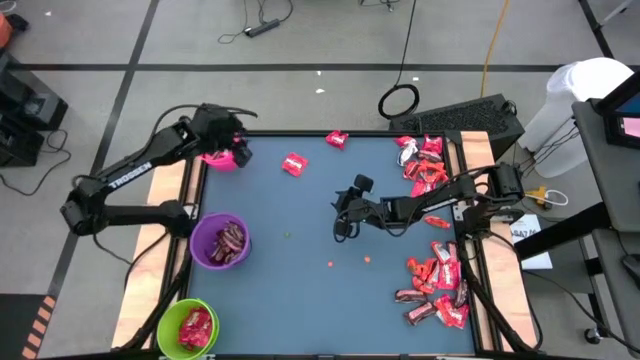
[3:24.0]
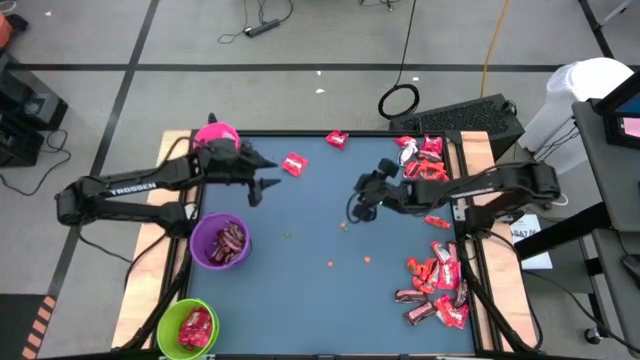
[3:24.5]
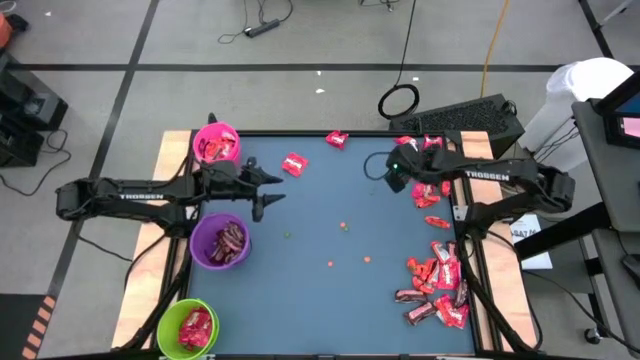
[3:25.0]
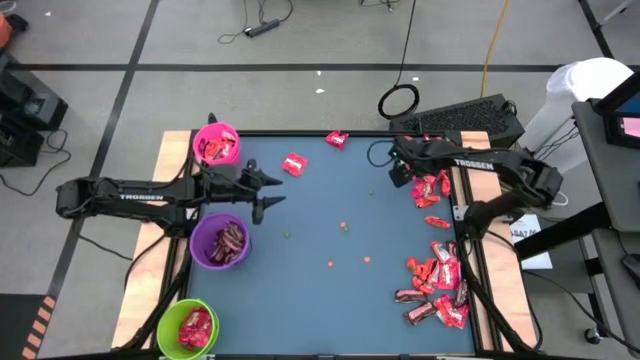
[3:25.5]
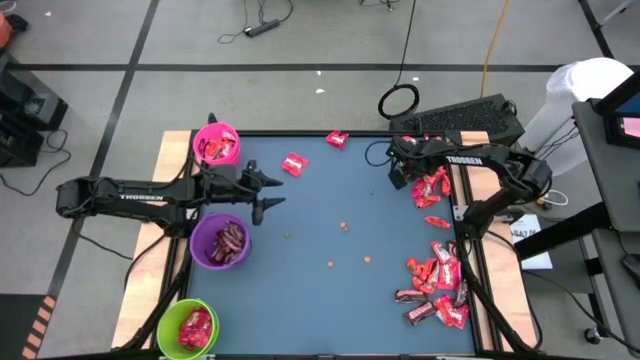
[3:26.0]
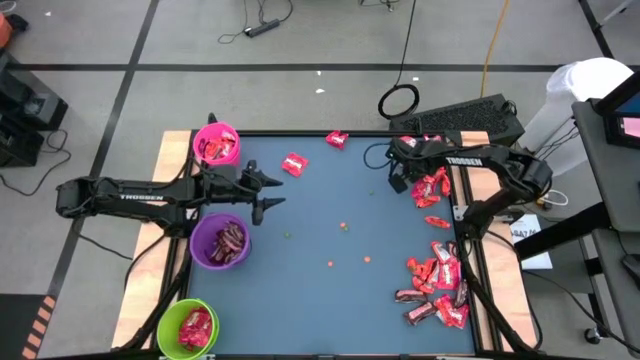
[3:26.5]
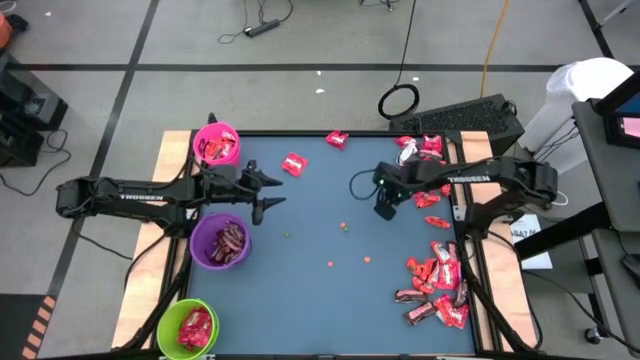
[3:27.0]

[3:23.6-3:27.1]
Task: Organize candy in baskets
Put the orange chocolate into the pink bucket

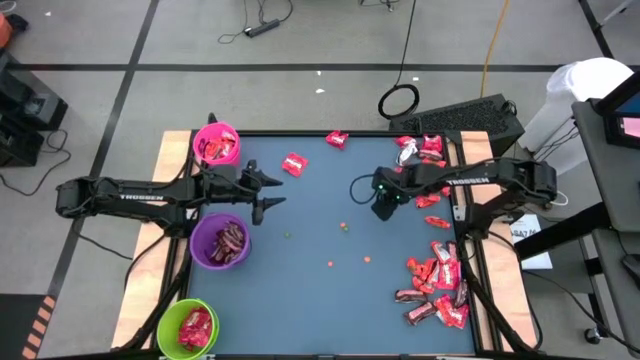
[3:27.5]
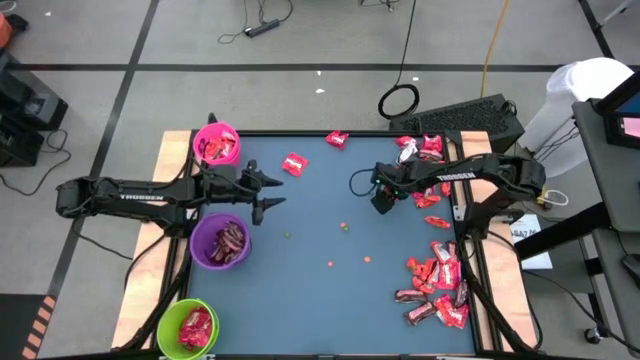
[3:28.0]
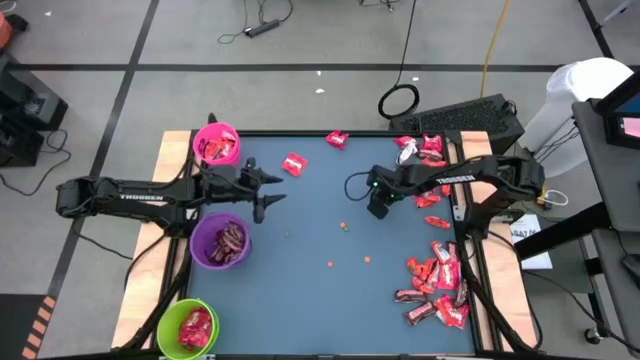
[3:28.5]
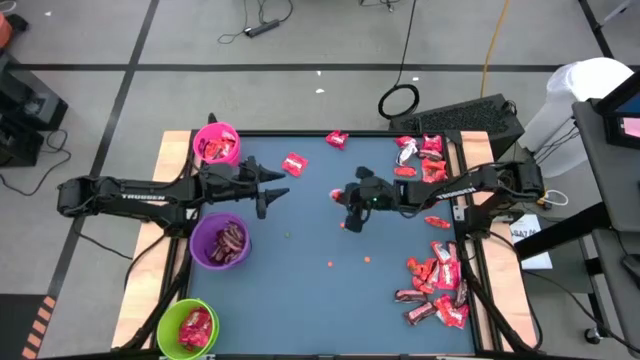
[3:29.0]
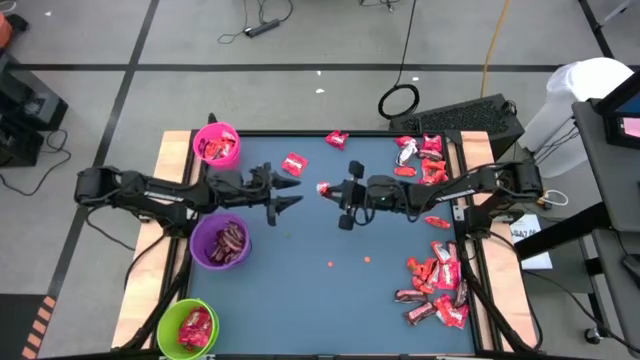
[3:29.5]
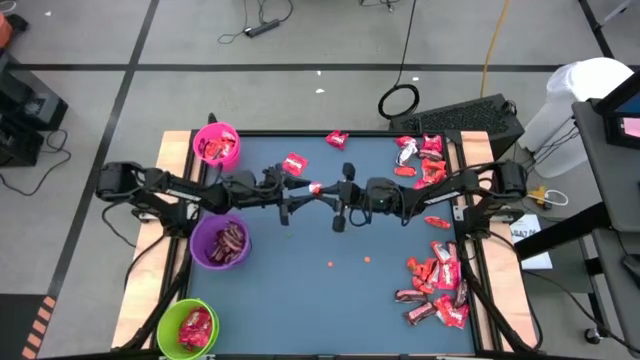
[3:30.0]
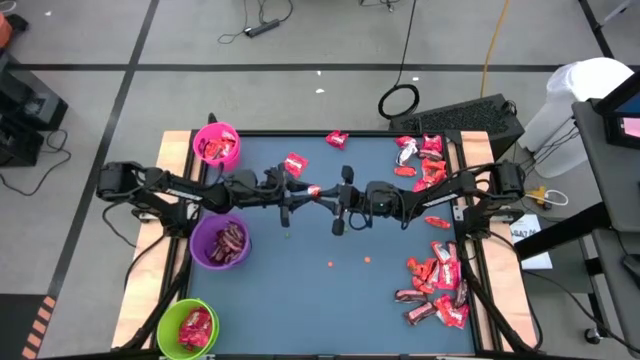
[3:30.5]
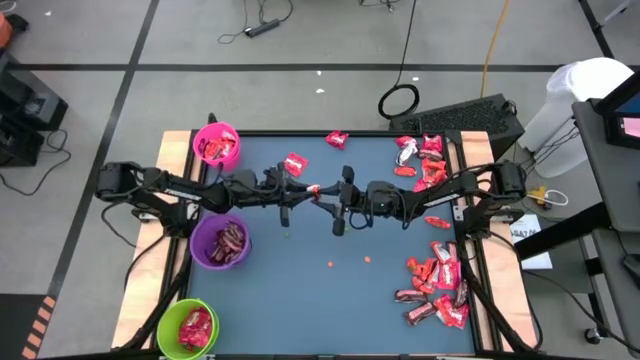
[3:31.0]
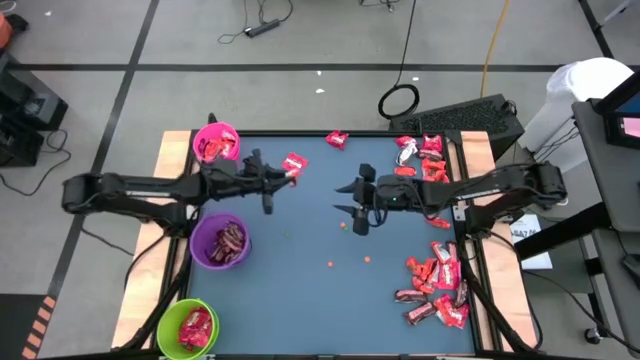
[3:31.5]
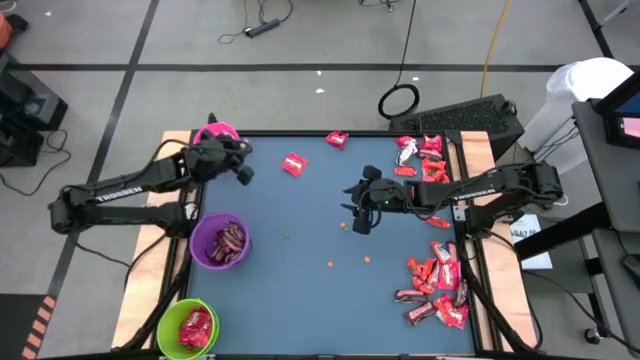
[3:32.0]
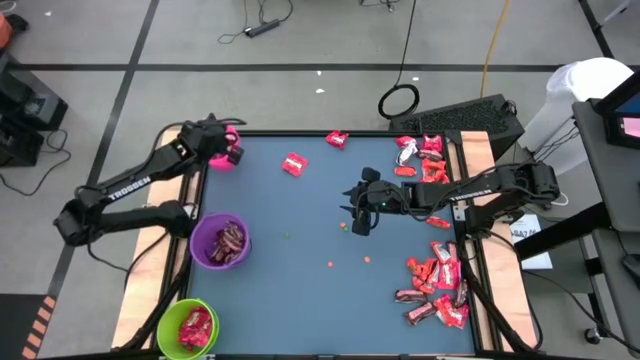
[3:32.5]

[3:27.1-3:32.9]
Put the orange chocolate into the pink bucket

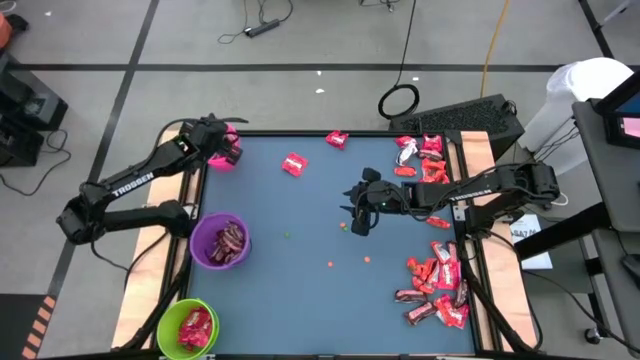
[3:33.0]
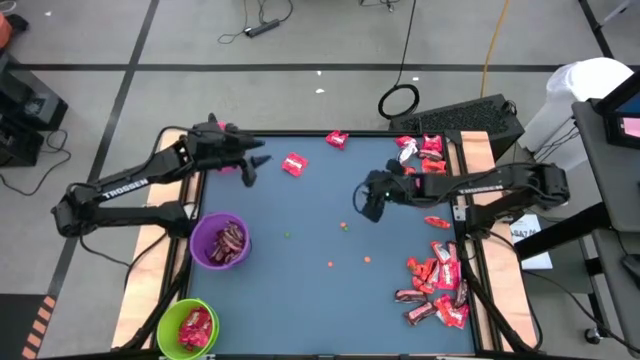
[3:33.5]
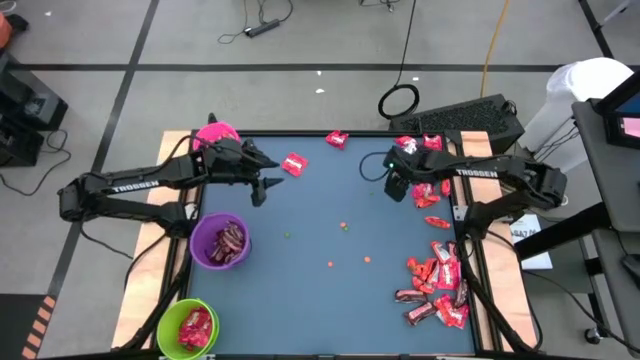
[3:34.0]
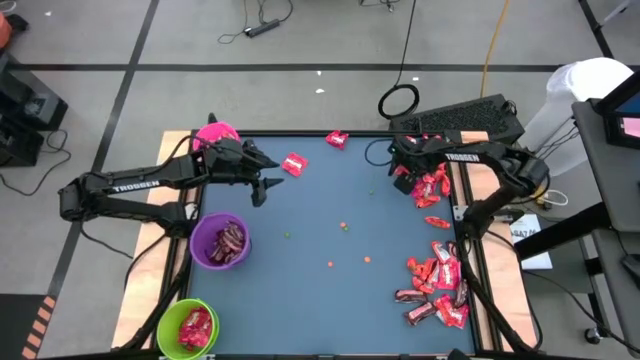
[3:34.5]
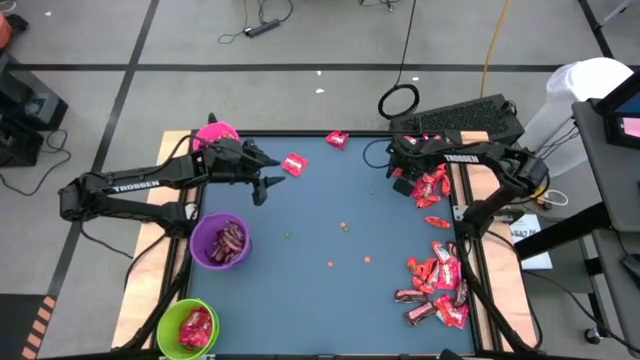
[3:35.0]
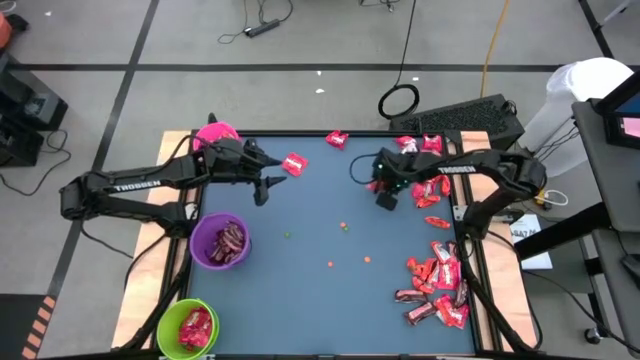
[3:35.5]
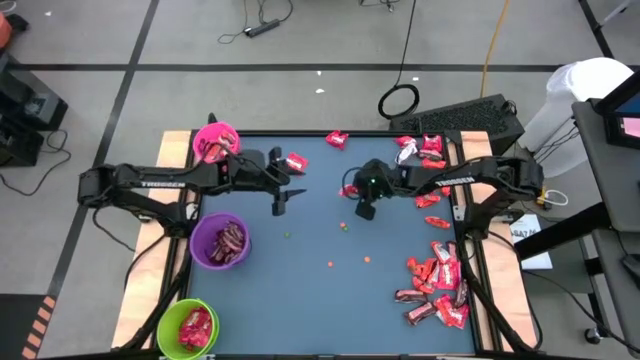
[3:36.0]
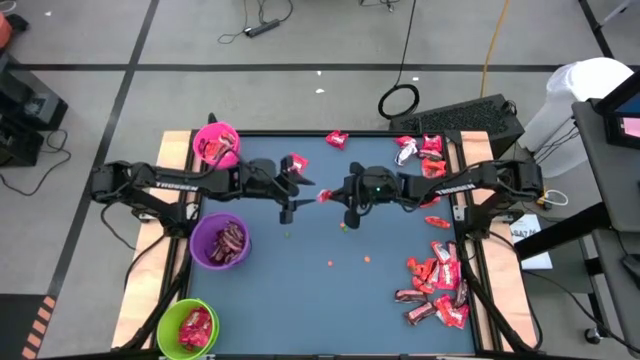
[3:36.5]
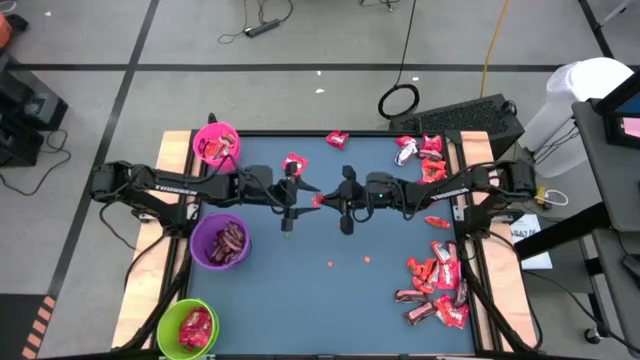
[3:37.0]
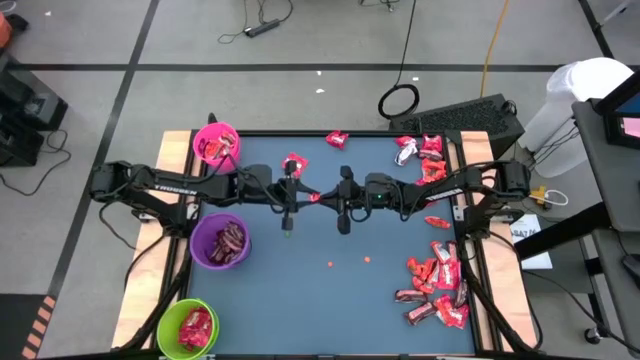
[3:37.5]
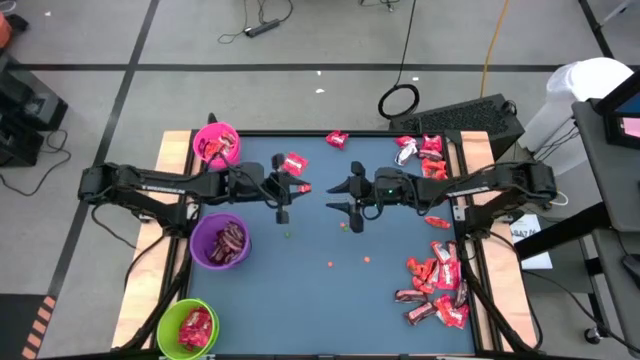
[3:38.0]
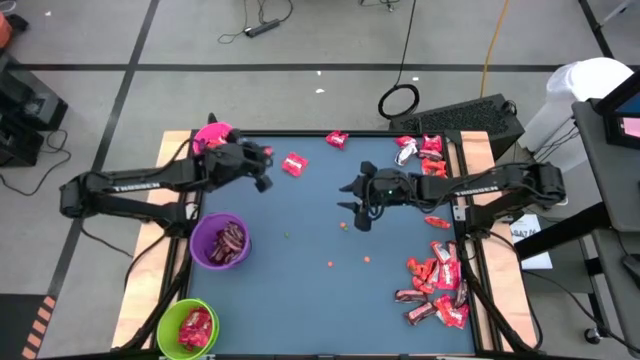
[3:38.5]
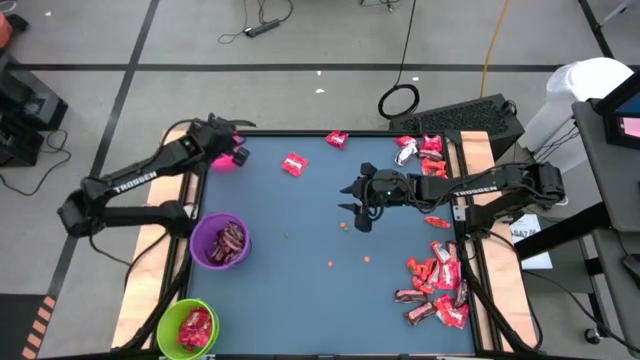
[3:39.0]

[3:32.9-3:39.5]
Put the orange chocolate into the pink bucket

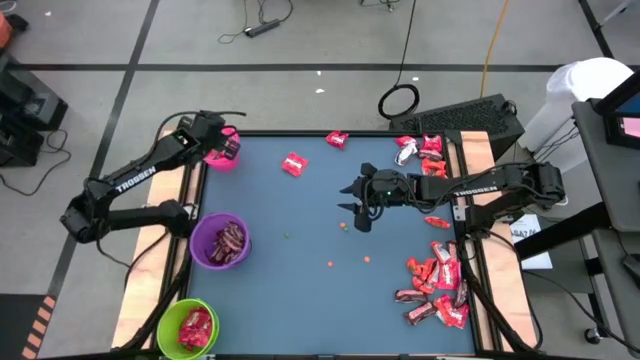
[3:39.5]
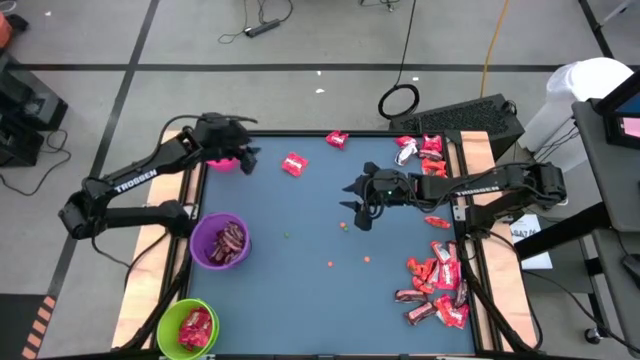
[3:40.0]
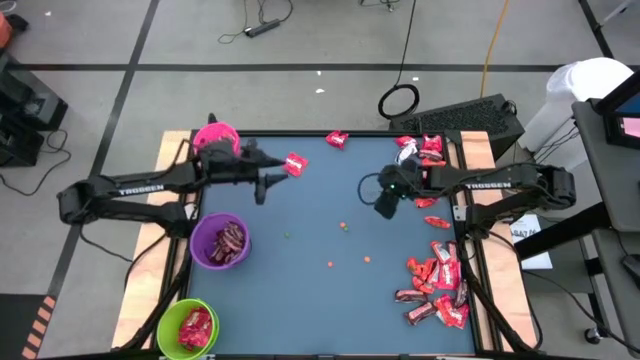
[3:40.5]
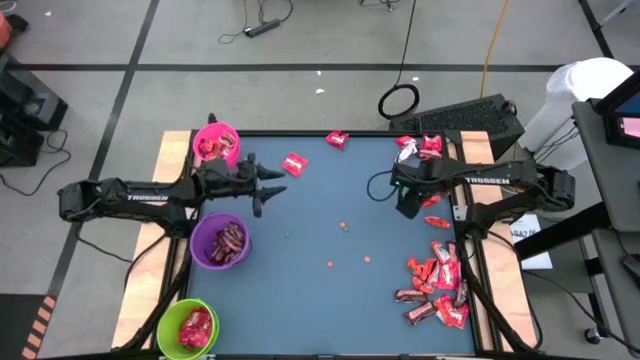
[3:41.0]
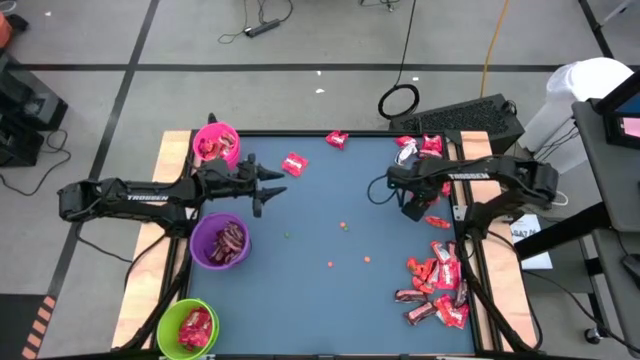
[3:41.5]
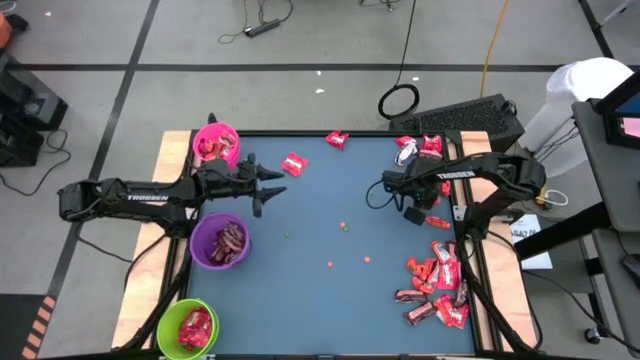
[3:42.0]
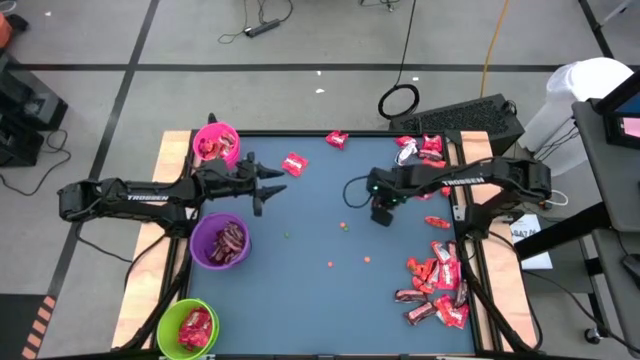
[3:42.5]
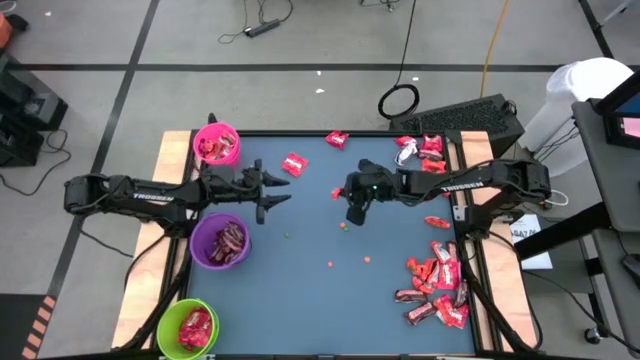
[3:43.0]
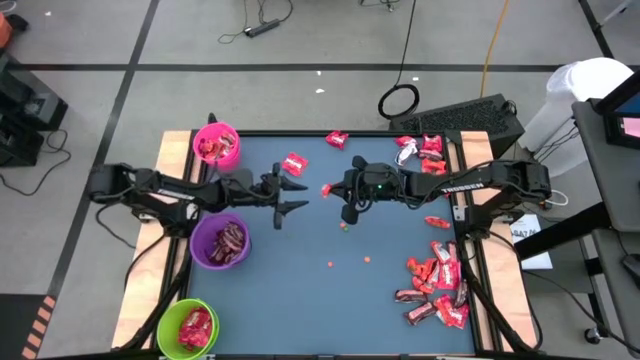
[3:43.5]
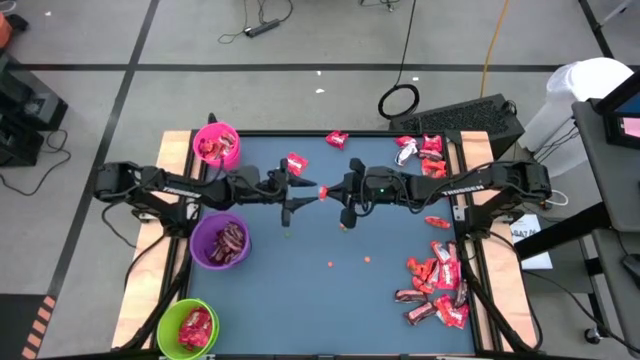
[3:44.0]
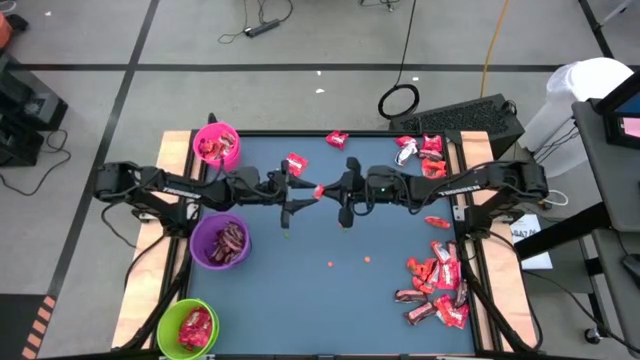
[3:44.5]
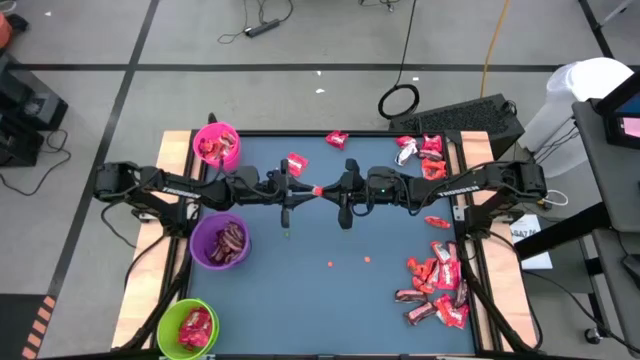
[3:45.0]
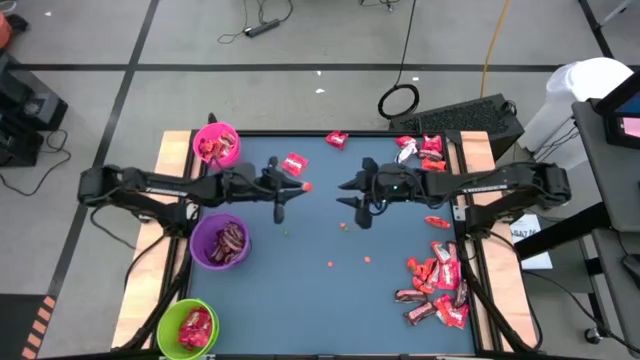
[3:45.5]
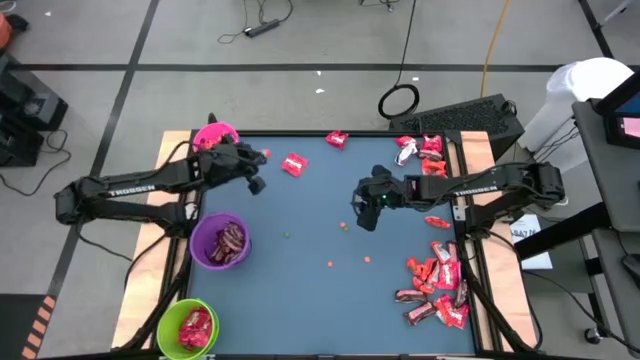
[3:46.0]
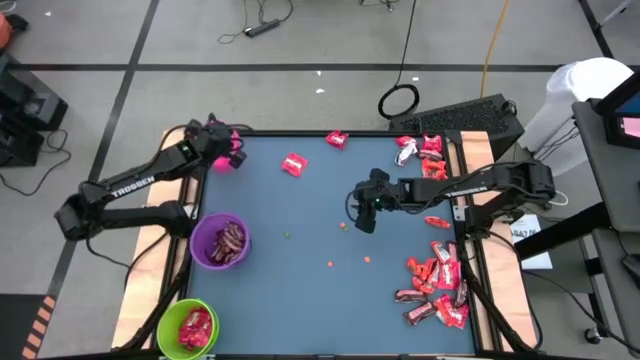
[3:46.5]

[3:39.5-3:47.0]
Put the orange chocolate into the pink bucket
